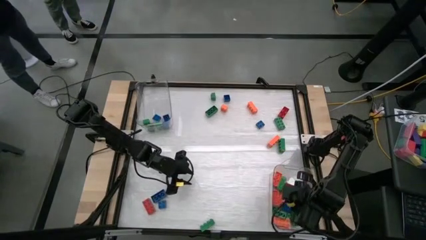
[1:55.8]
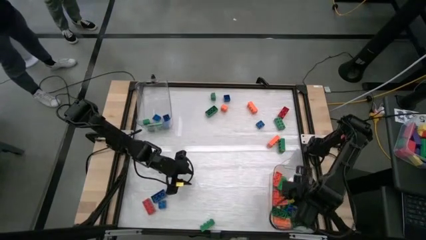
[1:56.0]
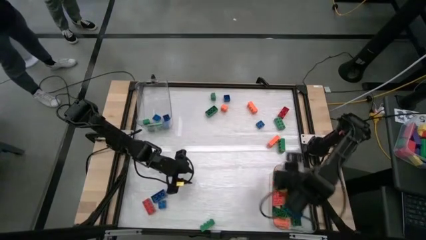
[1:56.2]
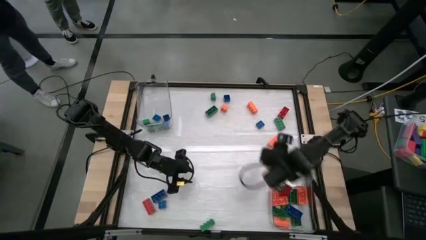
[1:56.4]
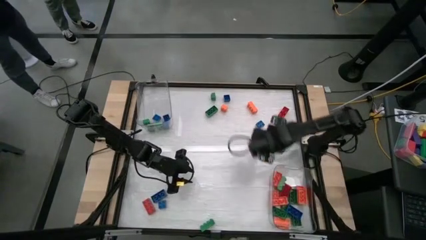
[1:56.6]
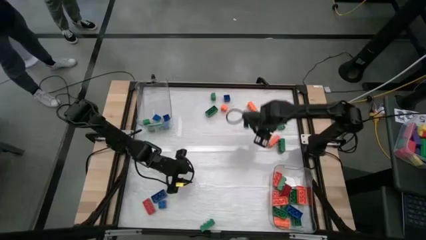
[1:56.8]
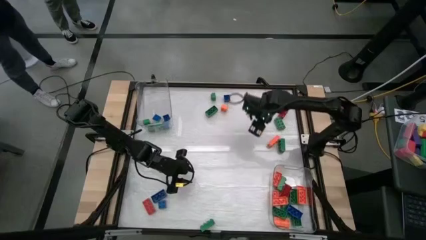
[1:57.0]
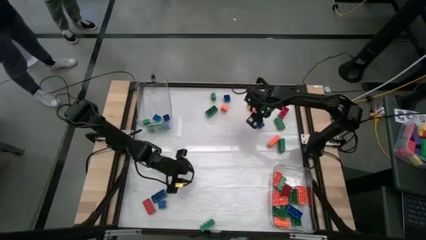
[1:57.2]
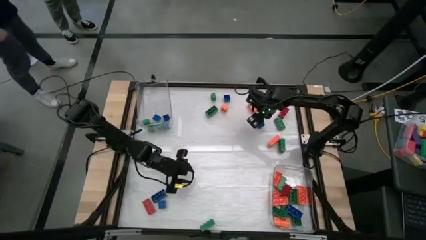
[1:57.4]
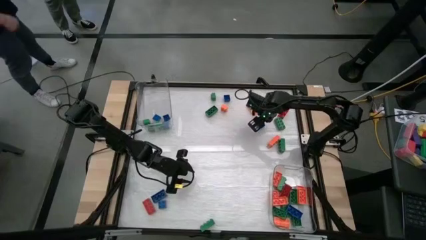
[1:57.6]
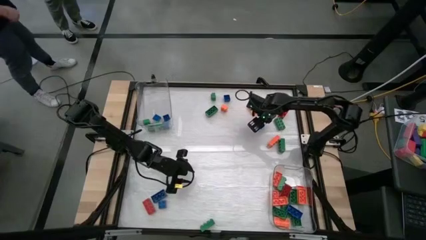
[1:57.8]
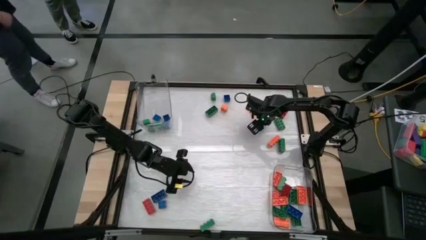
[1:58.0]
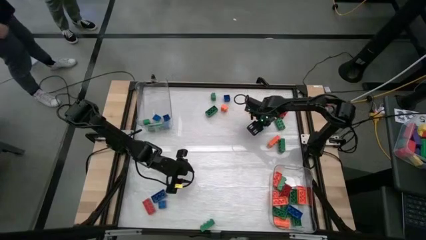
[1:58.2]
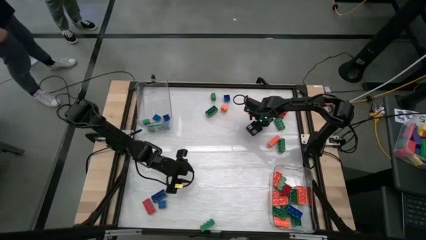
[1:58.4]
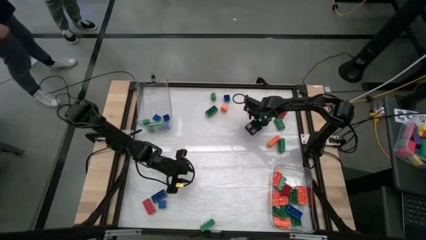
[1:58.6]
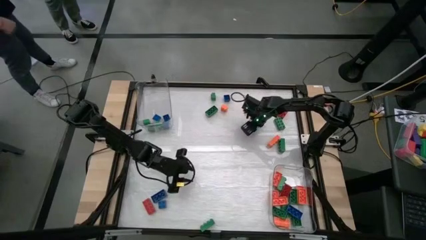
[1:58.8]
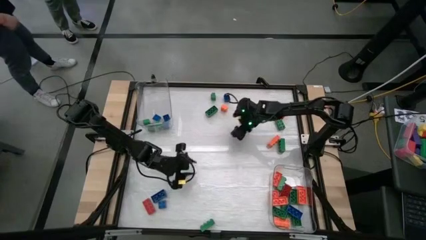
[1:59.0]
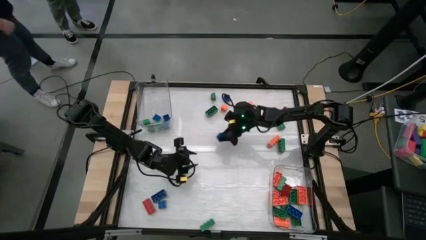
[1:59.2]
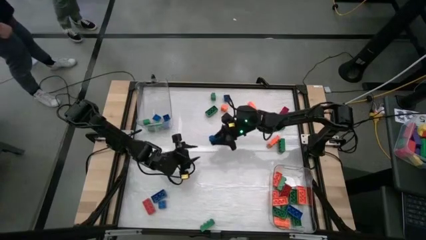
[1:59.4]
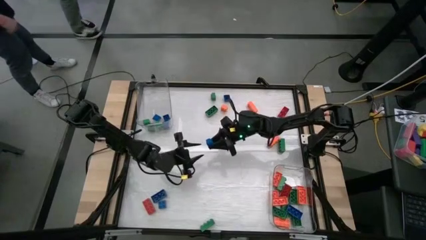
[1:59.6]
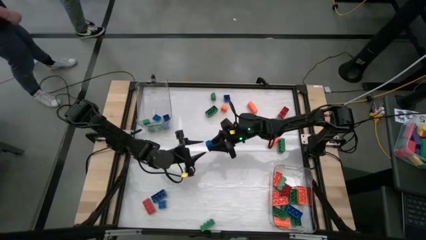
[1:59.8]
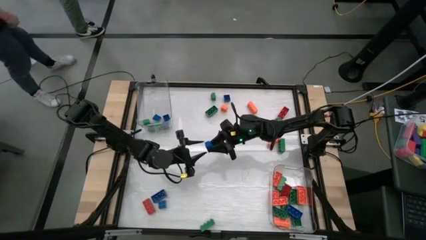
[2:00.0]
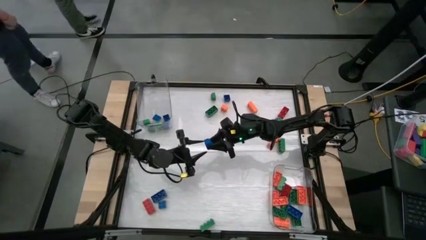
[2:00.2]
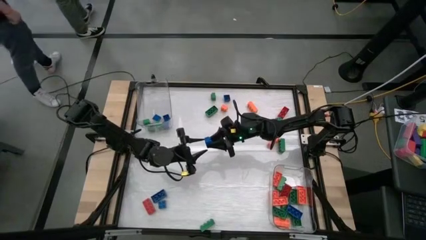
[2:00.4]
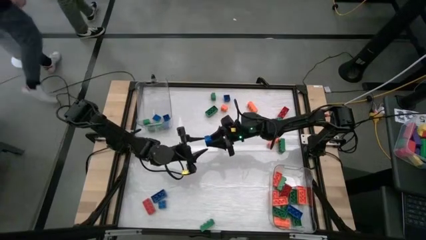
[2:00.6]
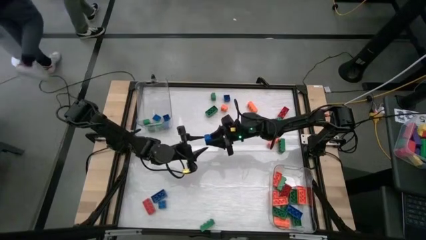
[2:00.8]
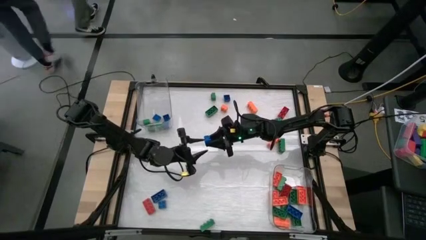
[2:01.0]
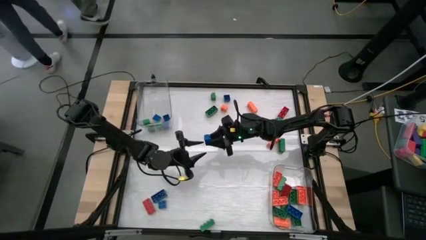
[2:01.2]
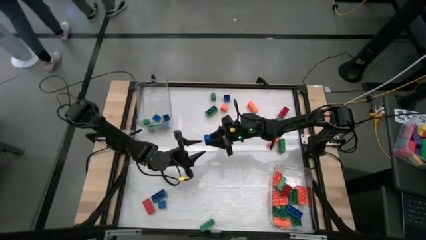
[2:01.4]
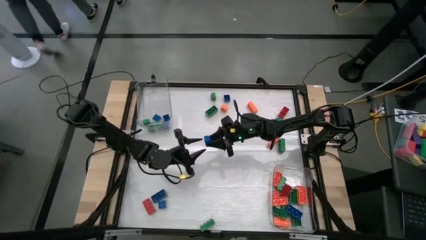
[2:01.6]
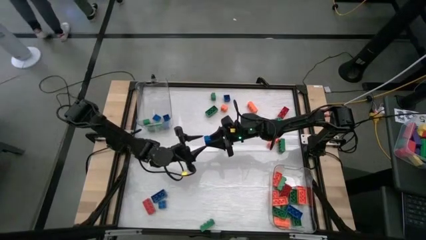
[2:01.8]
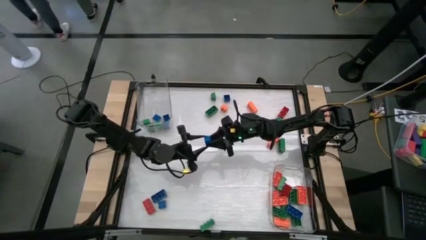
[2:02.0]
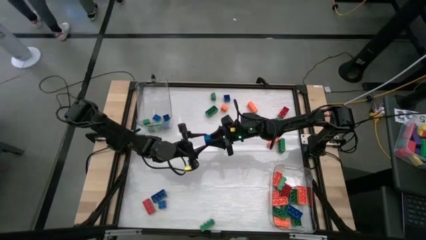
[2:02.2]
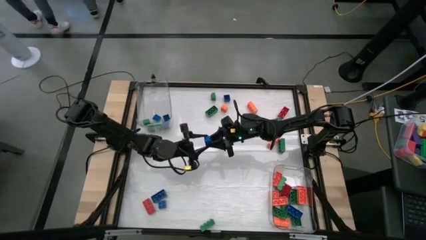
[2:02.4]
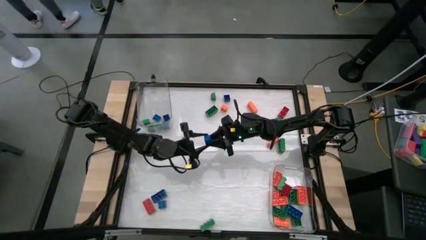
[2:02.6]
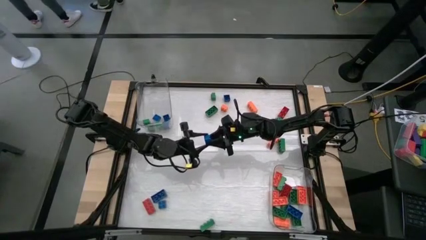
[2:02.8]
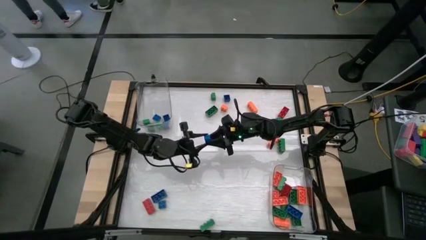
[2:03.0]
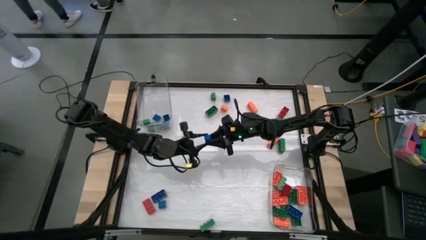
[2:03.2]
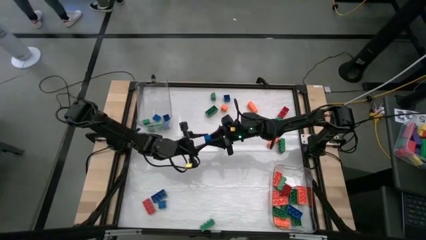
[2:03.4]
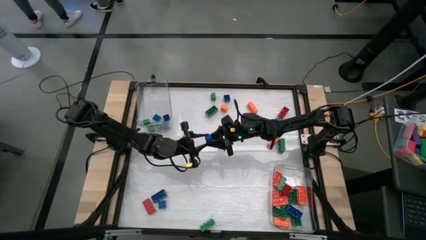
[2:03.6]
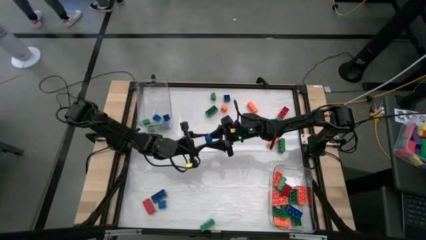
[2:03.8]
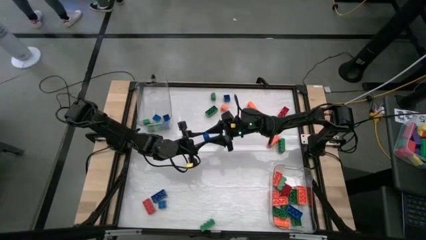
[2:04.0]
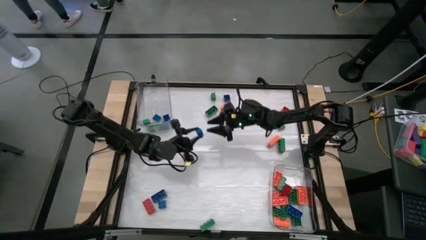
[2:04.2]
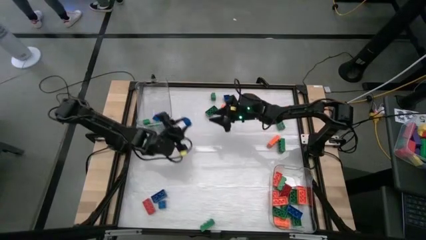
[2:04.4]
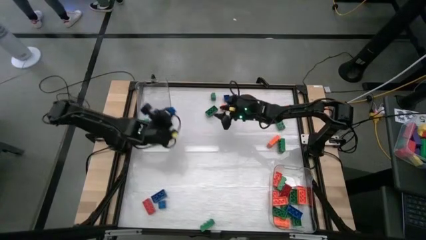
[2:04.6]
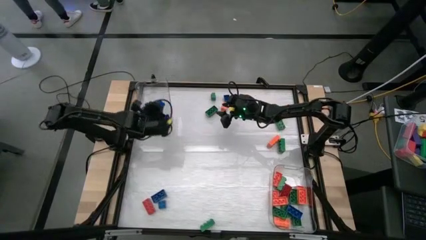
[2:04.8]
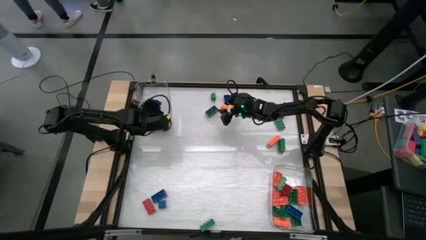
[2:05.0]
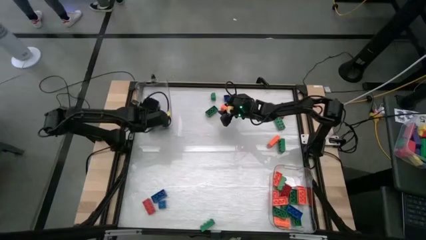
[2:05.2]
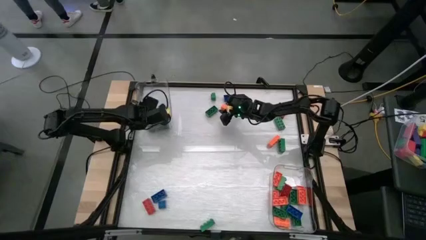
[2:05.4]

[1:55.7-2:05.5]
Task: Sort blocks by size
Put the 4 stud blue game piece into the top transparent bin

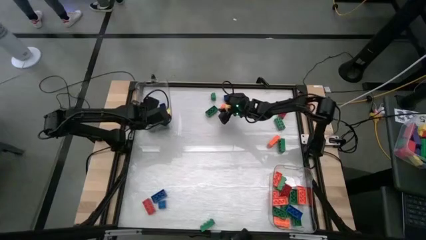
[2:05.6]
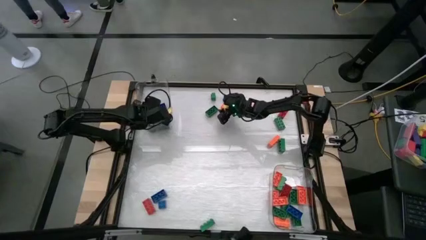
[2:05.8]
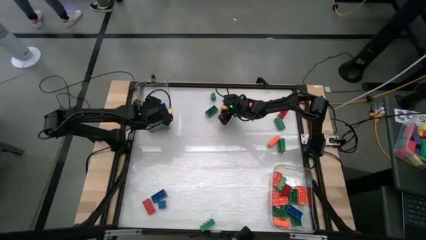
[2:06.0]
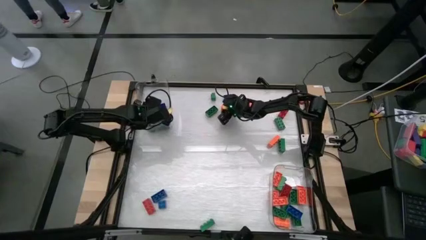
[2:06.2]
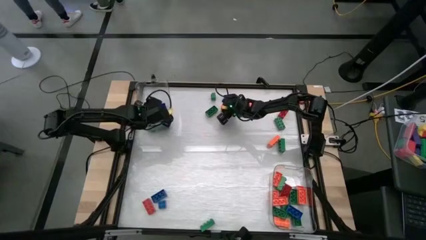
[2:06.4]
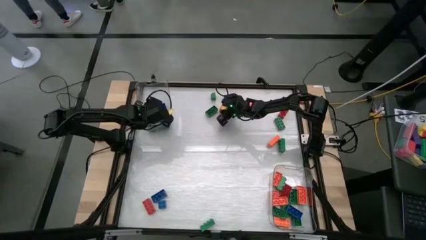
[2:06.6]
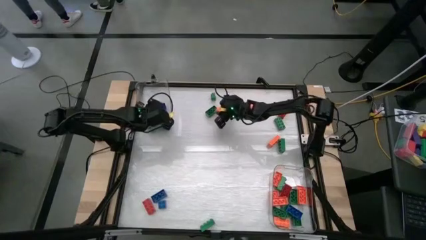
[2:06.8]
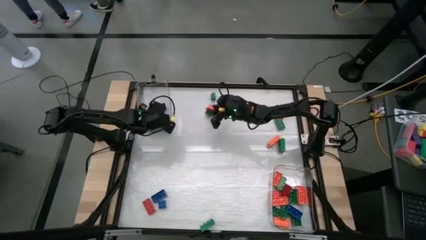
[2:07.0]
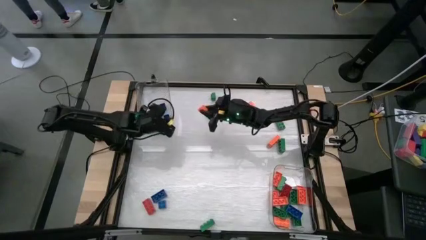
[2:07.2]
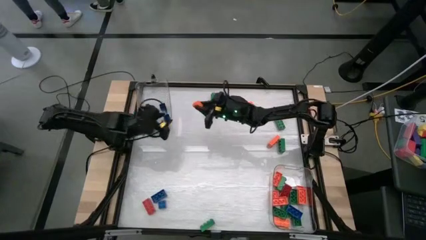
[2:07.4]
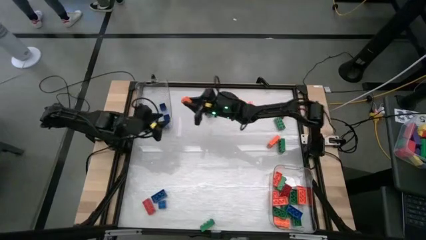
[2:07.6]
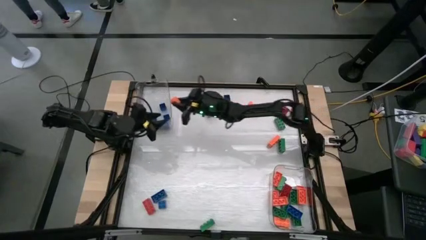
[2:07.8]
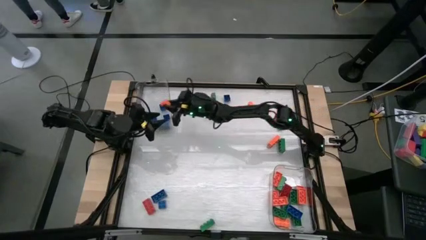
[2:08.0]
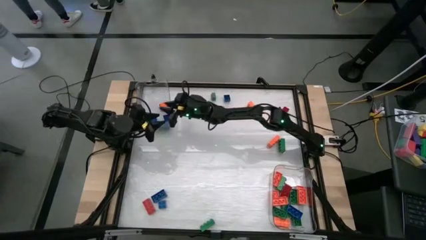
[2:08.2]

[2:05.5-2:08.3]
Put the 4 stud orange game piece into the top transparent bin

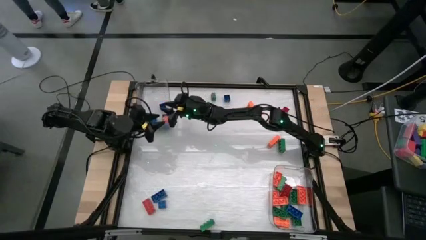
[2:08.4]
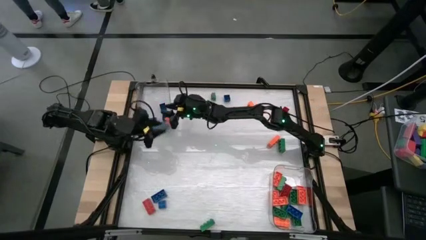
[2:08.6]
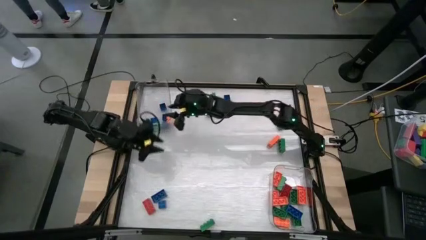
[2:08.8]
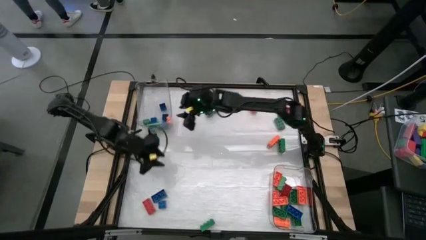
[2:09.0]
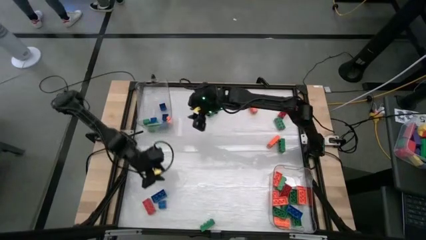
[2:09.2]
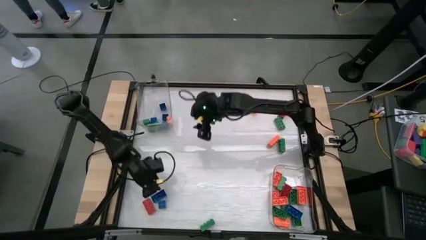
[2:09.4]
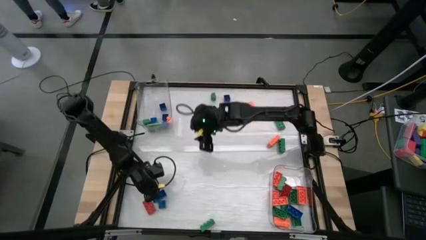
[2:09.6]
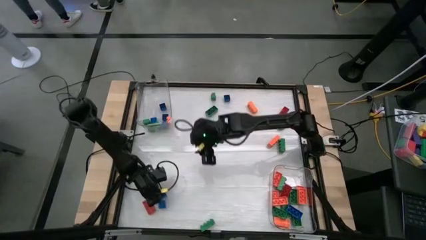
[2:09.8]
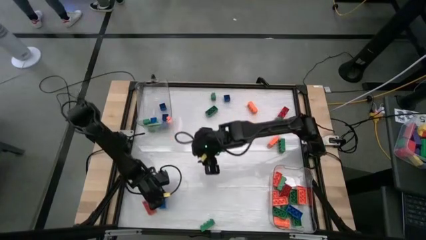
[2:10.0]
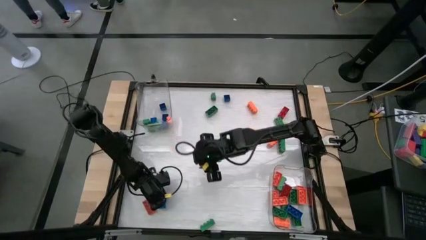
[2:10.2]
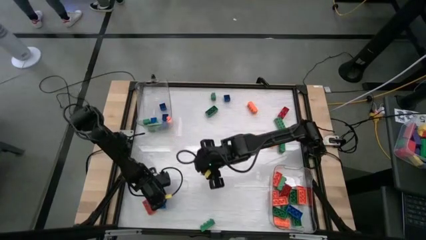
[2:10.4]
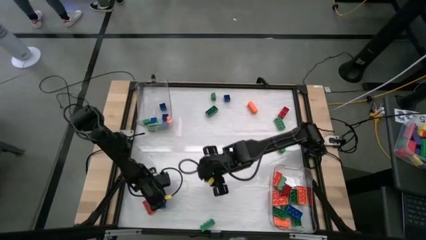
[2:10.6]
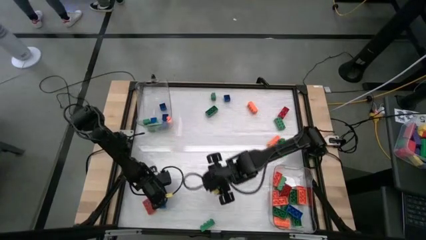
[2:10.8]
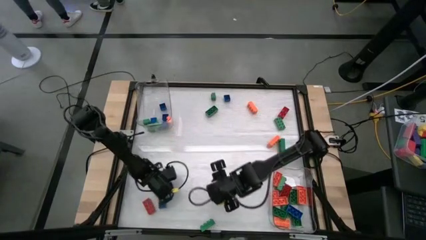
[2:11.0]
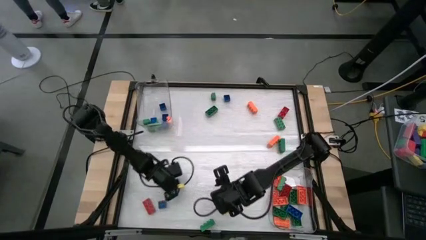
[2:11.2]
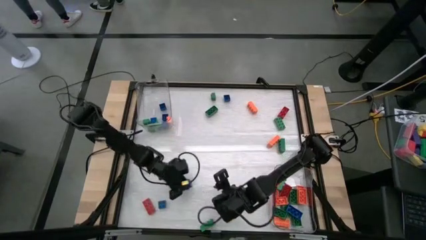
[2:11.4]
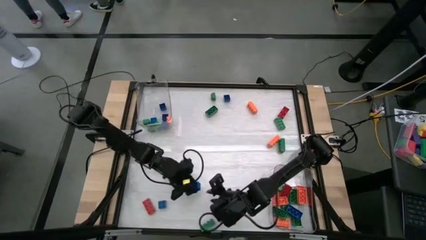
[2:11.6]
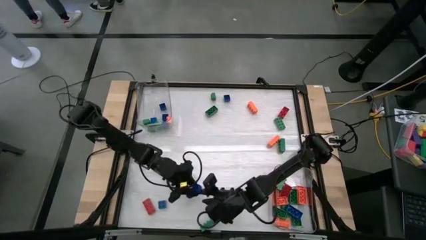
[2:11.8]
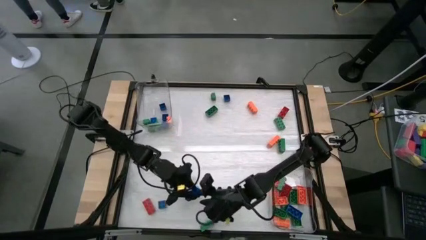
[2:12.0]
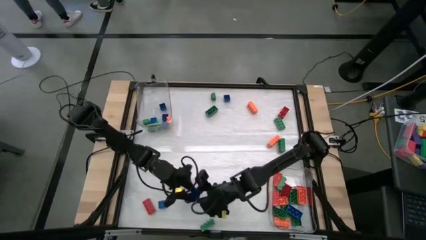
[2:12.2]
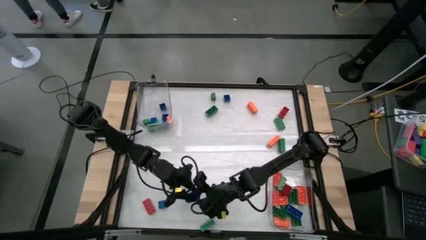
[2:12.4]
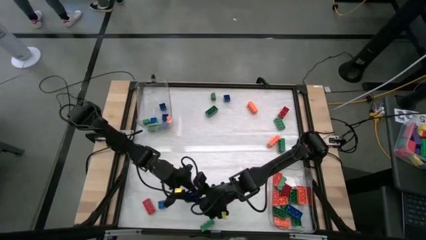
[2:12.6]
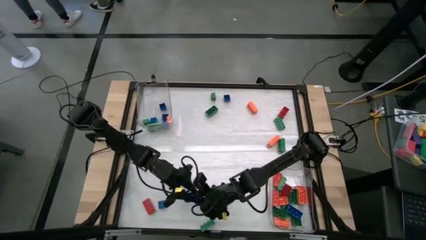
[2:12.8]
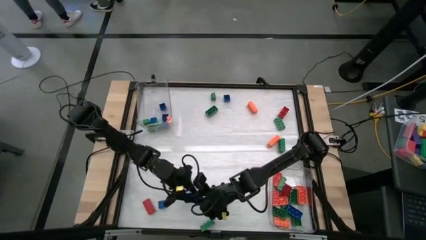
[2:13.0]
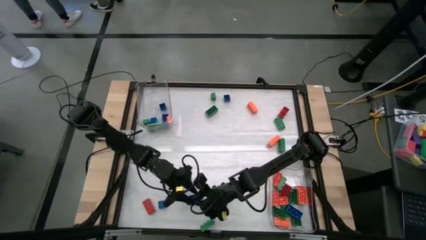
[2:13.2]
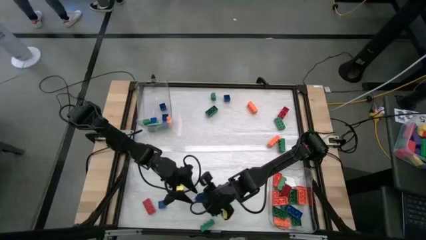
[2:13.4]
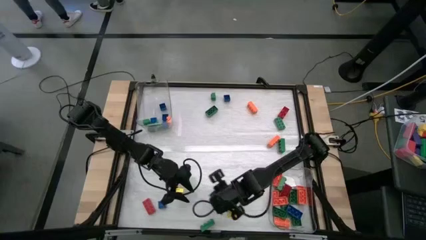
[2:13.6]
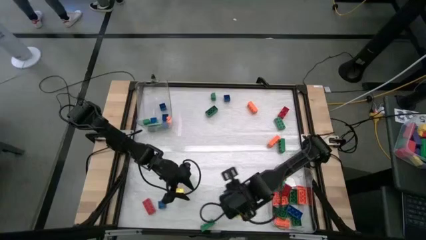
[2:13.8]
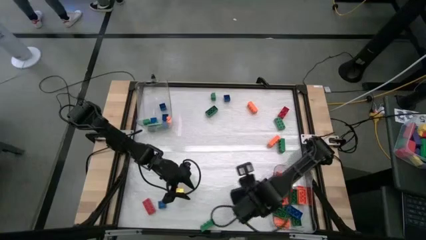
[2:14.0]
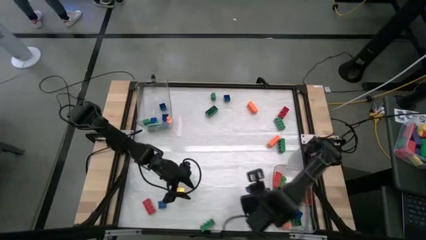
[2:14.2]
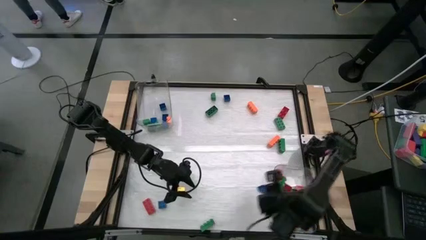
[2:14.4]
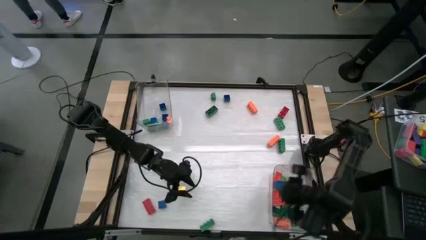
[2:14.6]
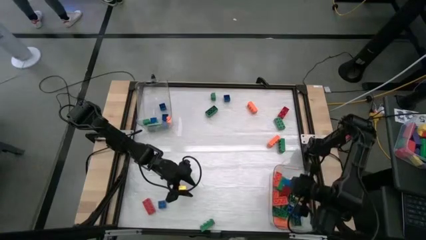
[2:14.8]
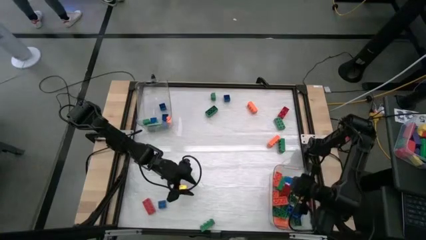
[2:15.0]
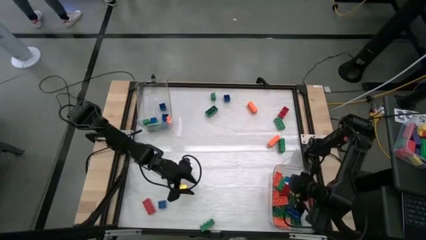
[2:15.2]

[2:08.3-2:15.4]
Put the 8 stud blue game piece into the bottom transparent bin
